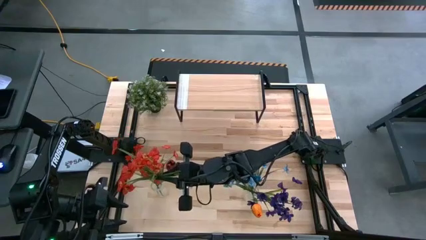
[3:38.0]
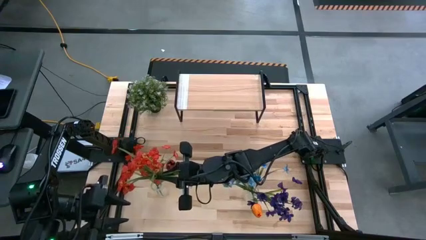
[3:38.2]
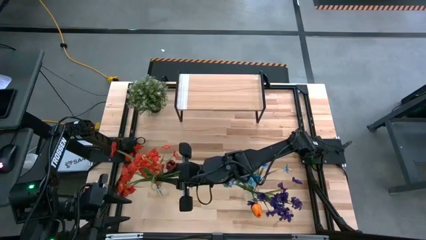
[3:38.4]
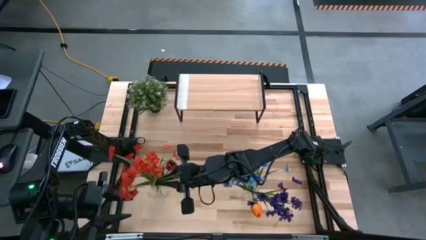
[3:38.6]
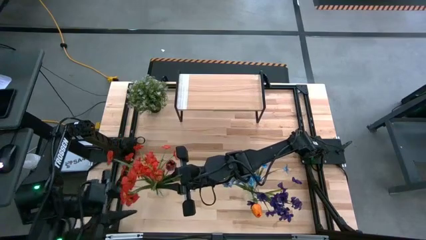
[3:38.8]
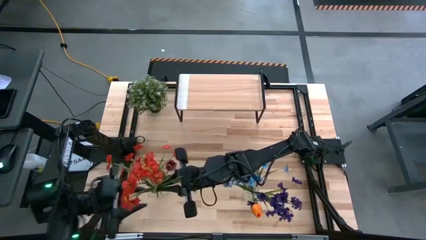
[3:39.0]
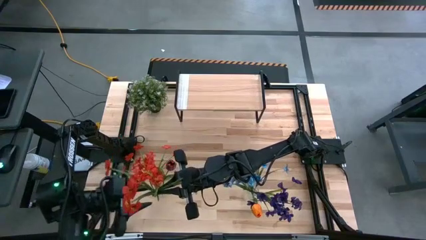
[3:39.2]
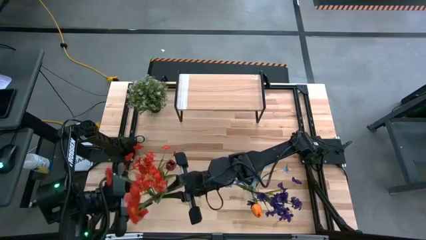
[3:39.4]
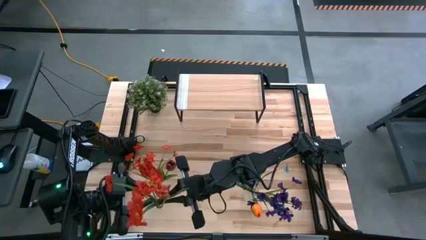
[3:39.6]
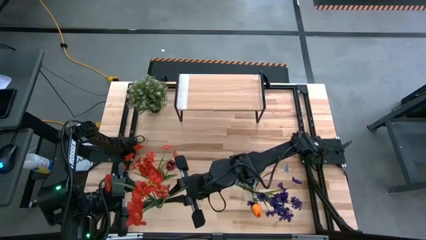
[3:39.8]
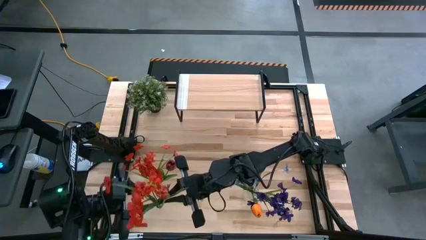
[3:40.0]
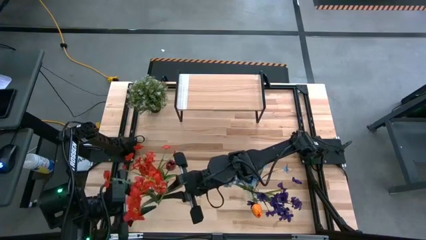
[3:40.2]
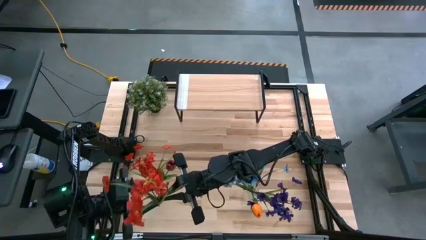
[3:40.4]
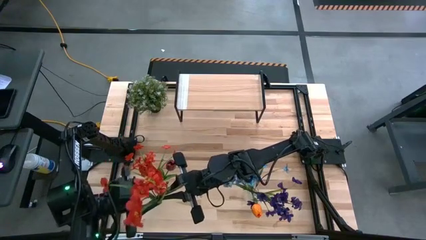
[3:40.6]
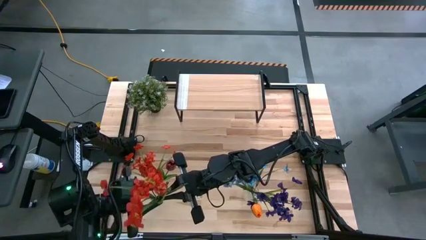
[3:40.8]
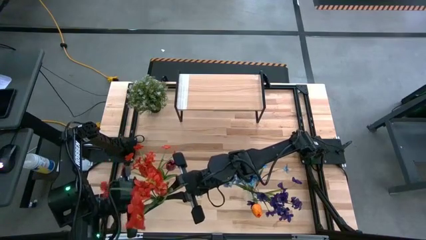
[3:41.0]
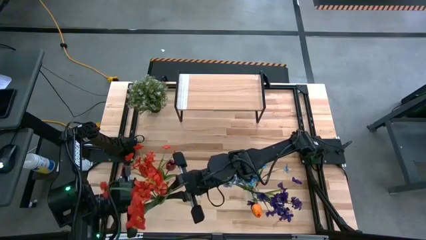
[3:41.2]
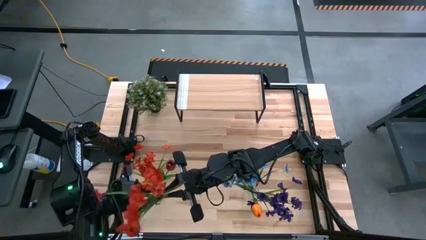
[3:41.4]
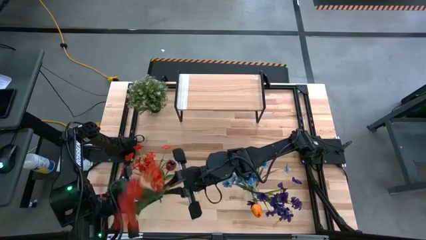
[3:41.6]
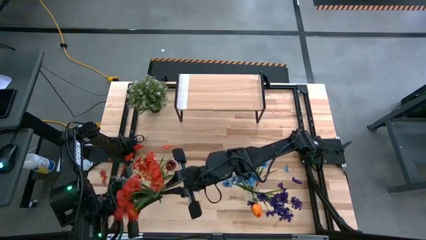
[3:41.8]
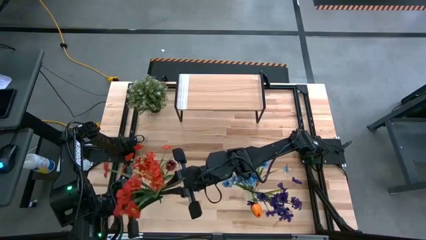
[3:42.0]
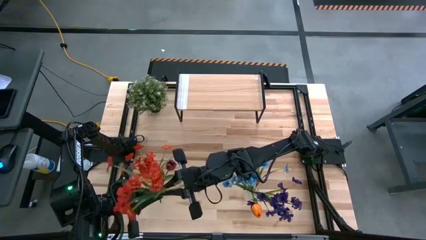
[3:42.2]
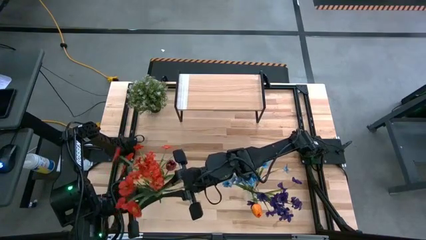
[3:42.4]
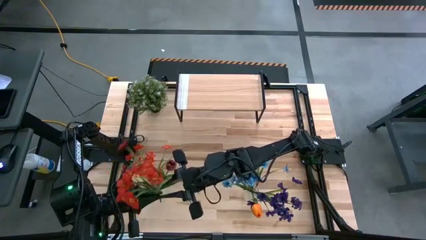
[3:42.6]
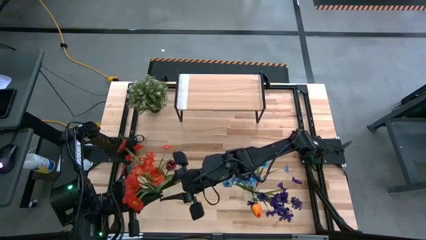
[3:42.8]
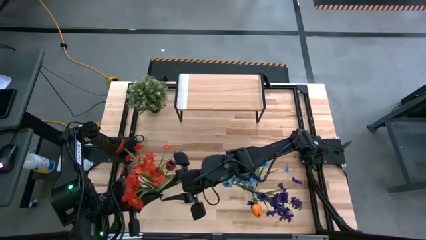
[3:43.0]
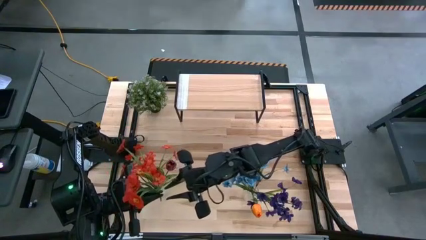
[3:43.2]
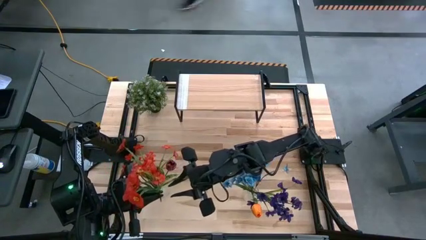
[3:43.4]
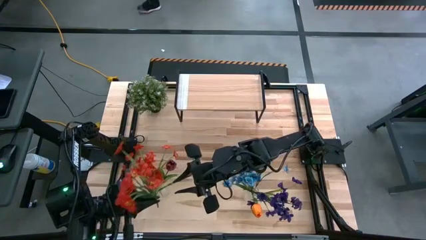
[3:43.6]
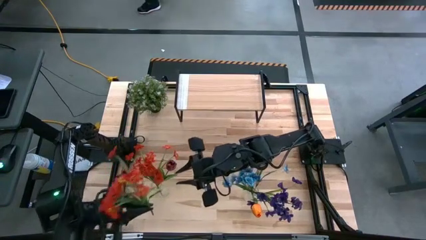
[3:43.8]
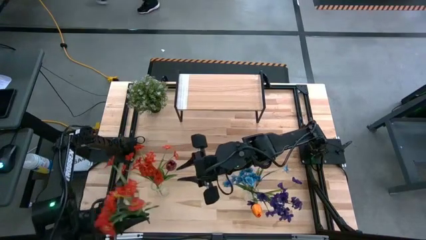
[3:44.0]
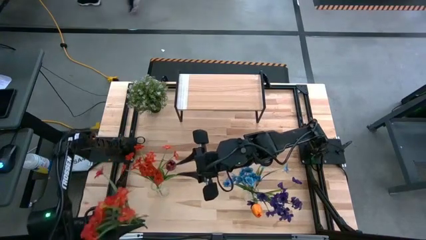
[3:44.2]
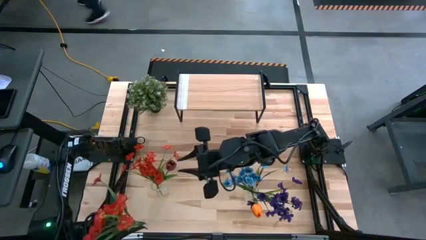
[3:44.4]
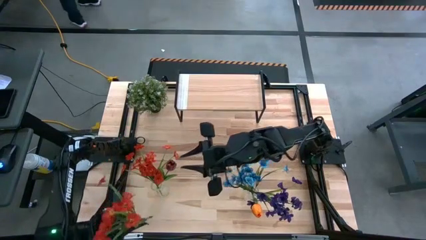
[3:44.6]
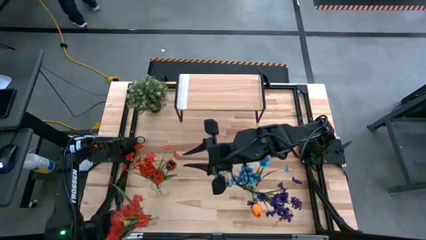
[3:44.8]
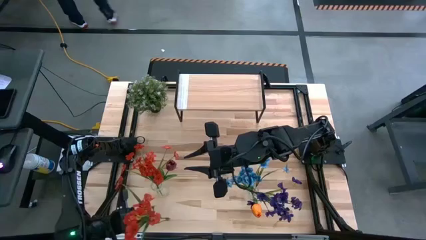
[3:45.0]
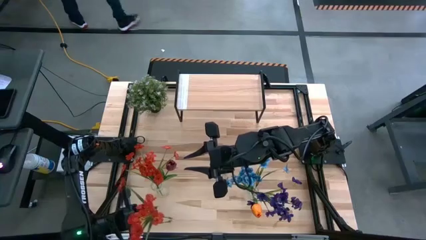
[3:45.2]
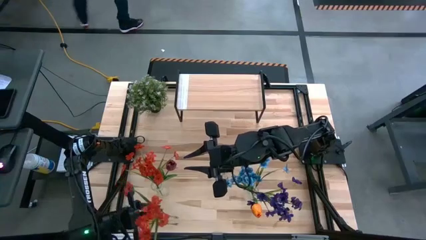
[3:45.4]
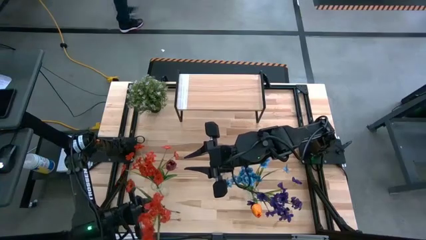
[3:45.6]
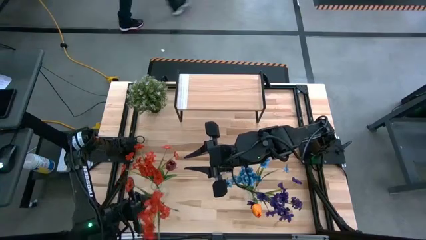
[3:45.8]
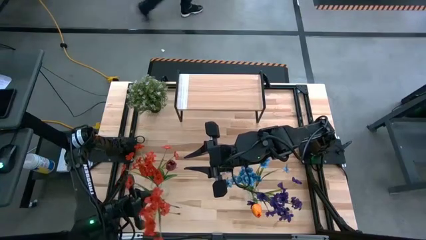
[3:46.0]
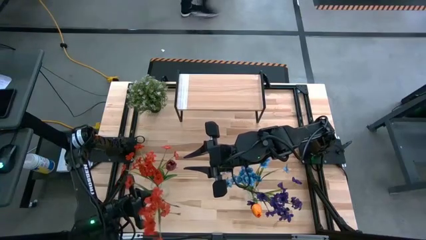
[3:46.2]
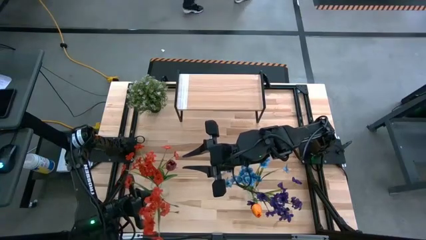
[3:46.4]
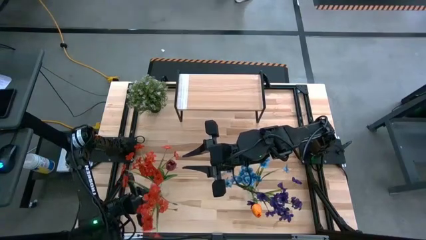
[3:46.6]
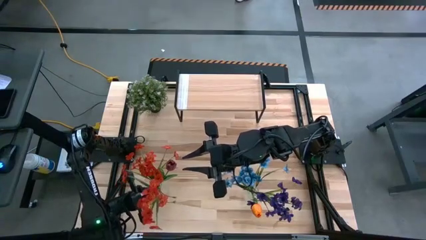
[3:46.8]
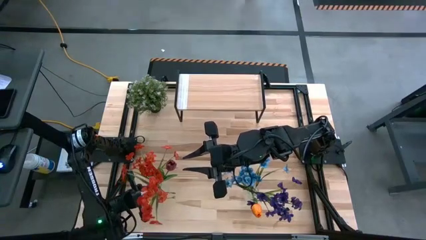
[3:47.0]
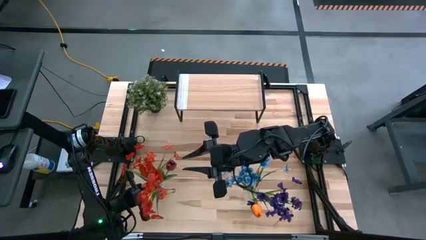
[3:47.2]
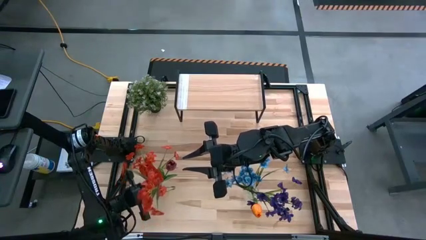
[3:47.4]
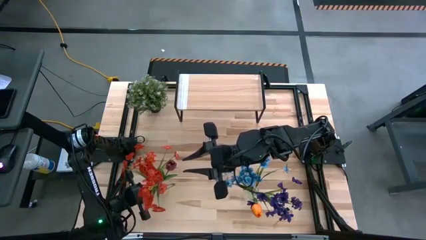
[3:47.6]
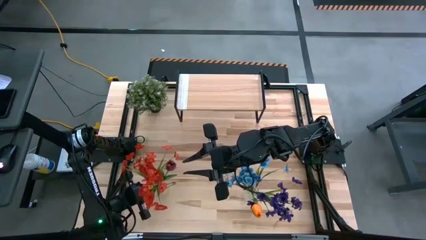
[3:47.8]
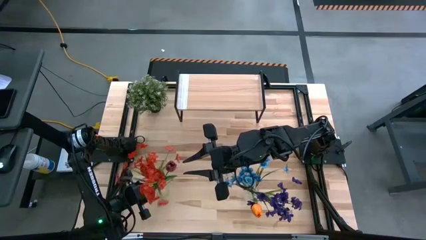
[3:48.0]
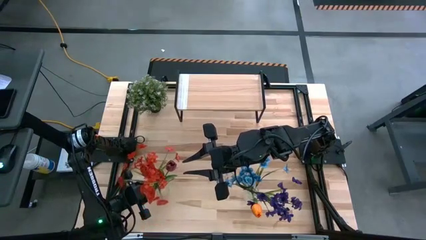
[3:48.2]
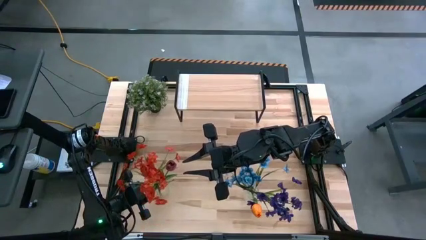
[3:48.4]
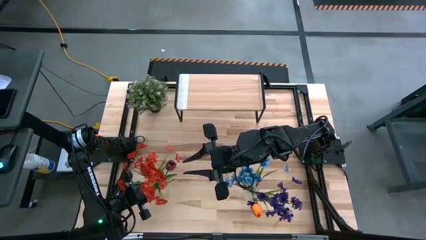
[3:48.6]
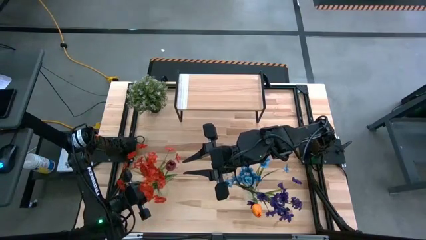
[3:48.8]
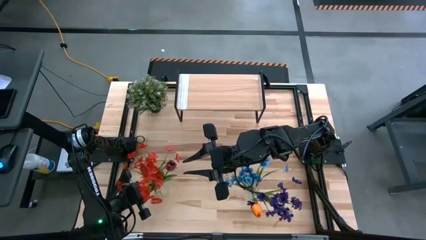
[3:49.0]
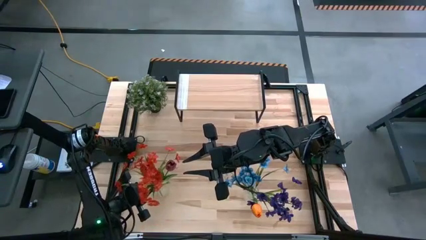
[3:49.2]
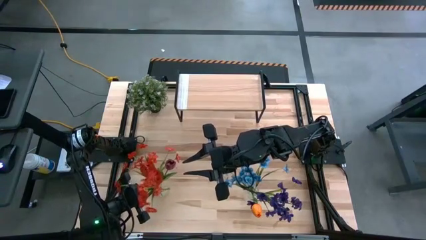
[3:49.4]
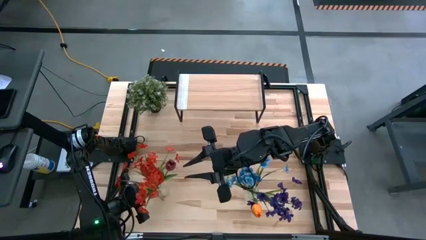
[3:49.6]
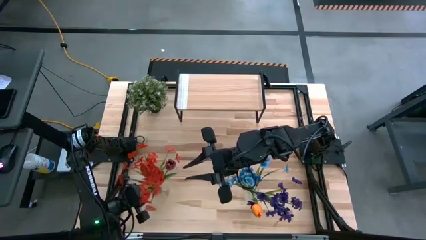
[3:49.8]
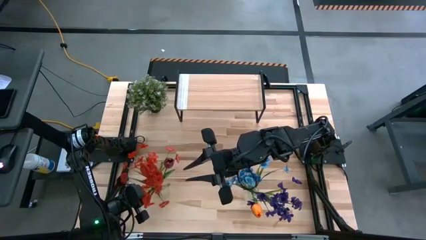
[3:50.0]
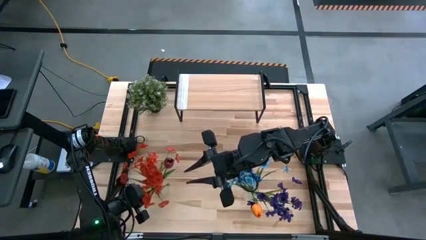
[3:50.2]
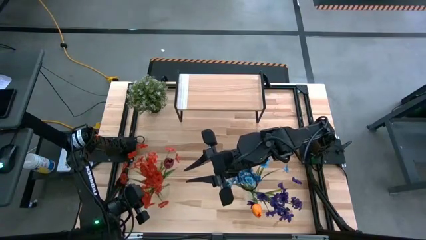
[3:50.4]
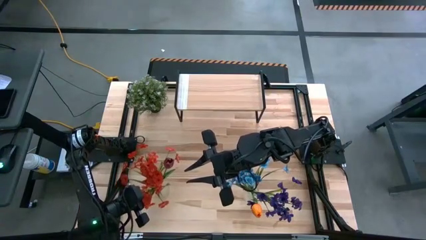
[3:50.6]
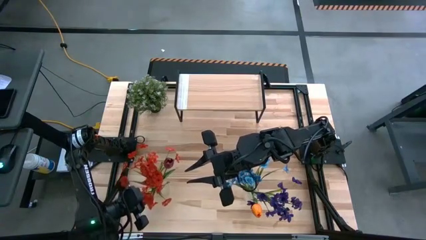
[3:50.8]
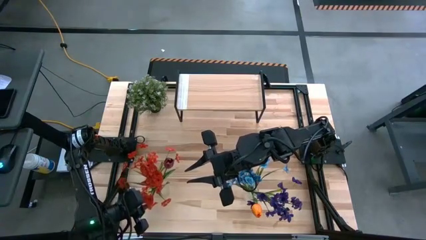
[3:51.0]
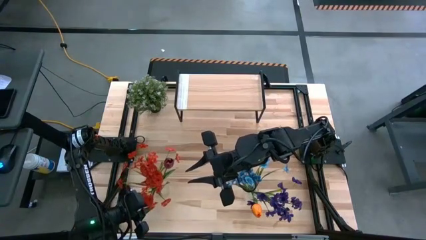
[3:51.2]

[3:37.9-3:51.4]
Task: Pick and place flowers into a vace then onto a shelf
Put the orange flowers into the left transparent vase
